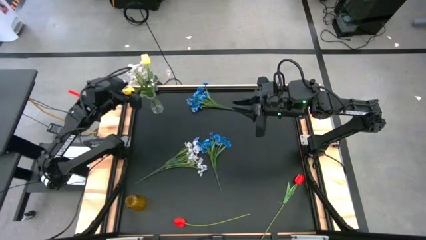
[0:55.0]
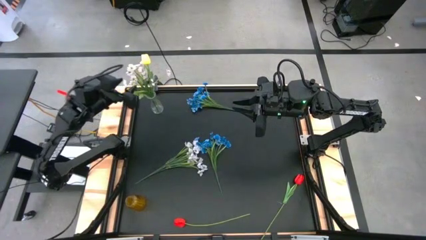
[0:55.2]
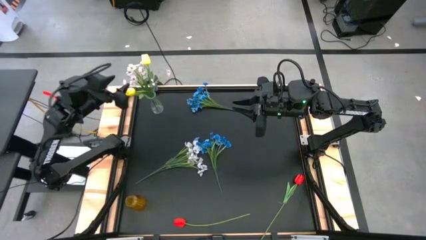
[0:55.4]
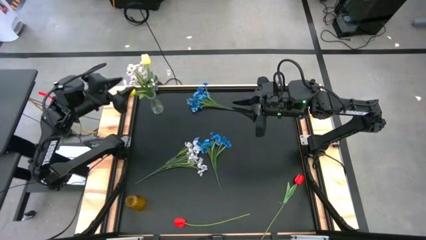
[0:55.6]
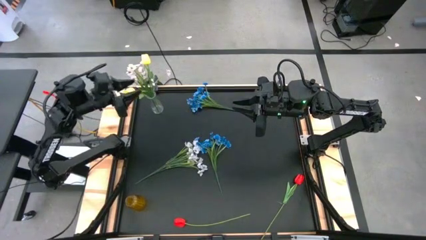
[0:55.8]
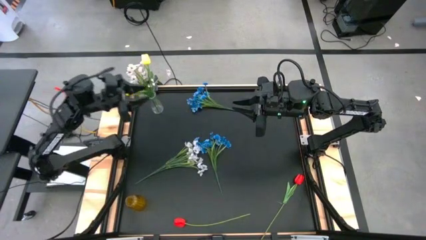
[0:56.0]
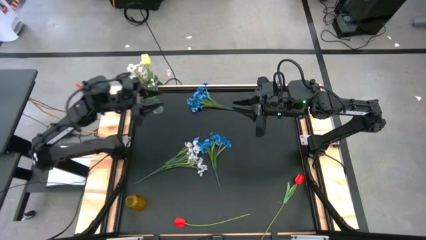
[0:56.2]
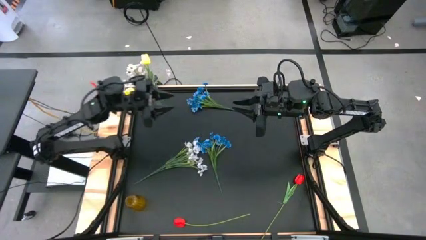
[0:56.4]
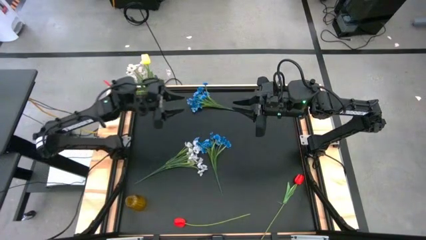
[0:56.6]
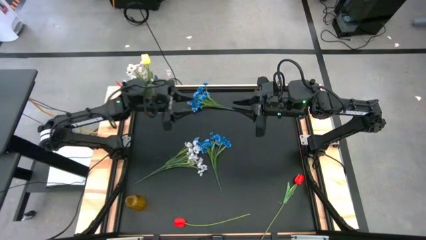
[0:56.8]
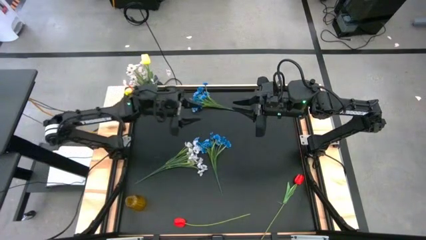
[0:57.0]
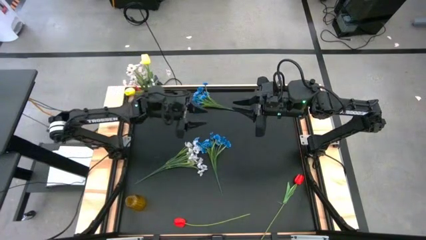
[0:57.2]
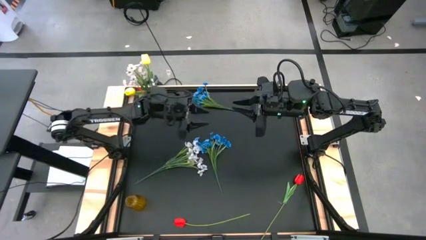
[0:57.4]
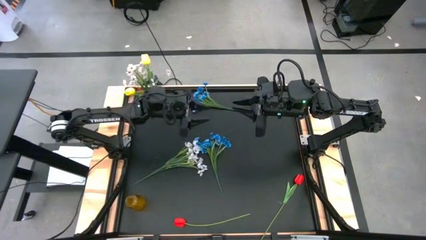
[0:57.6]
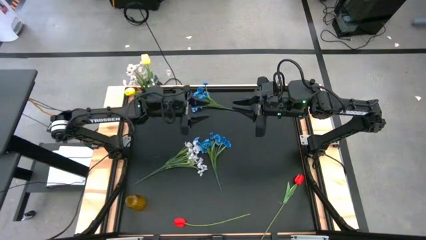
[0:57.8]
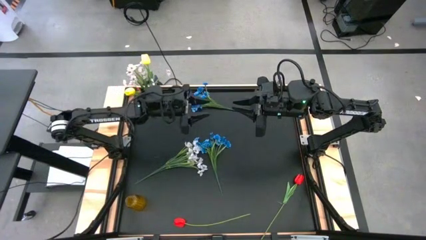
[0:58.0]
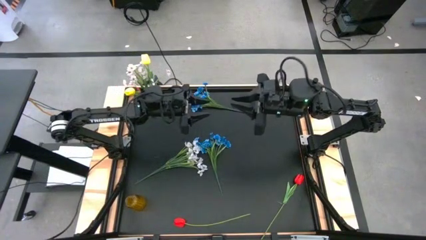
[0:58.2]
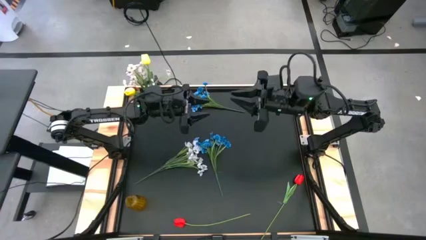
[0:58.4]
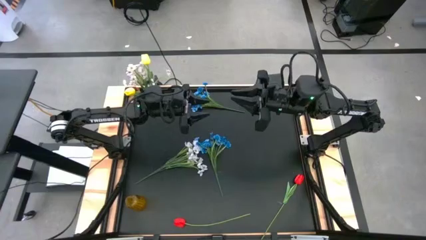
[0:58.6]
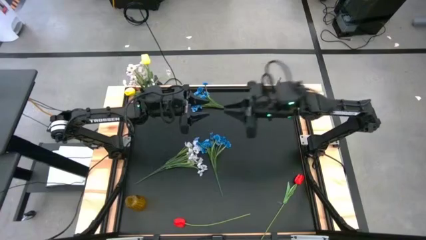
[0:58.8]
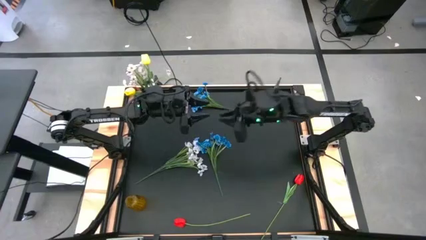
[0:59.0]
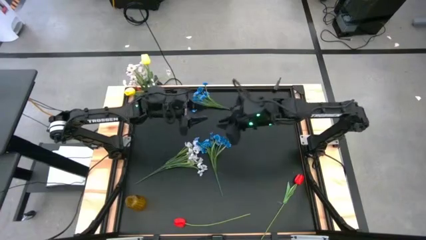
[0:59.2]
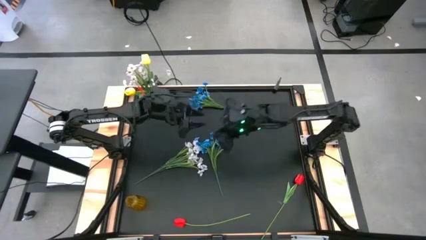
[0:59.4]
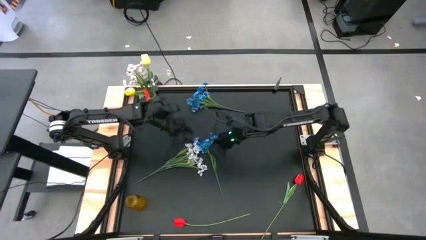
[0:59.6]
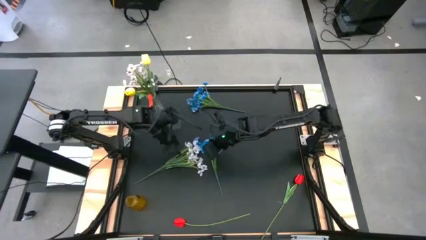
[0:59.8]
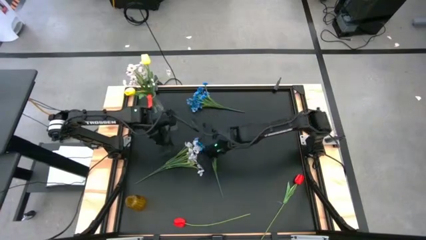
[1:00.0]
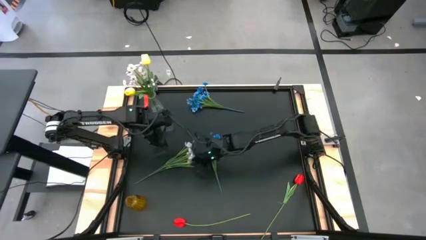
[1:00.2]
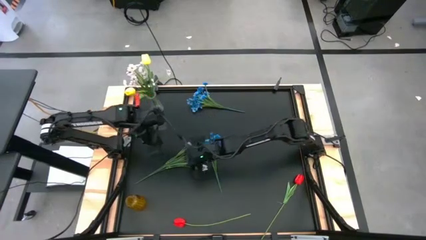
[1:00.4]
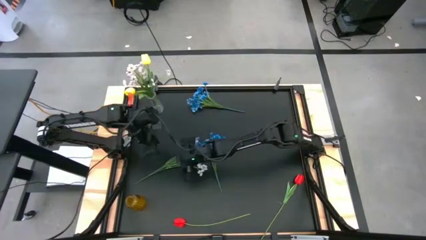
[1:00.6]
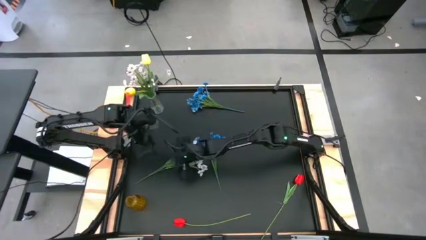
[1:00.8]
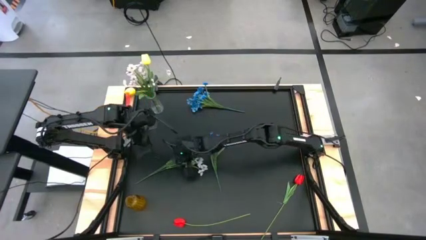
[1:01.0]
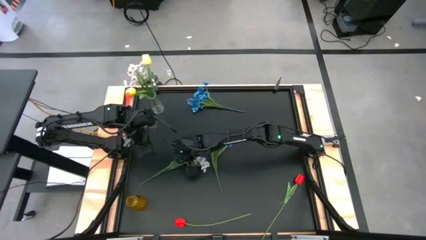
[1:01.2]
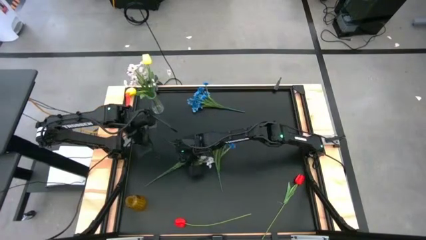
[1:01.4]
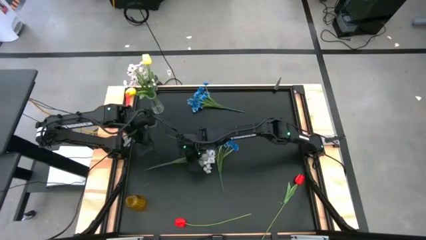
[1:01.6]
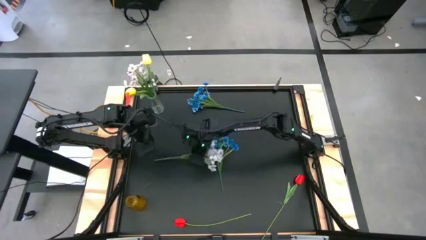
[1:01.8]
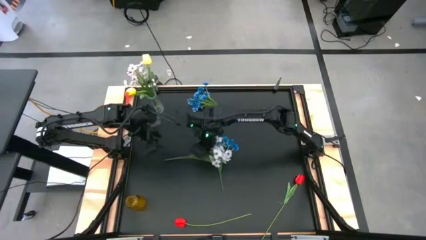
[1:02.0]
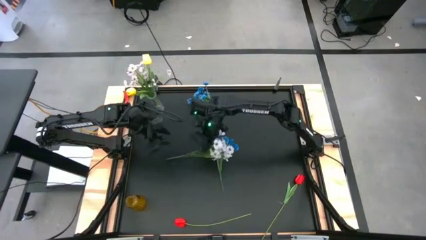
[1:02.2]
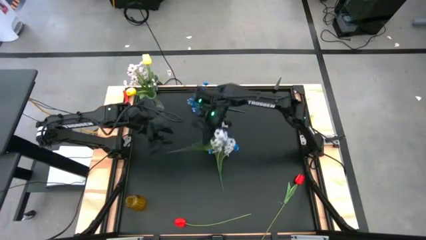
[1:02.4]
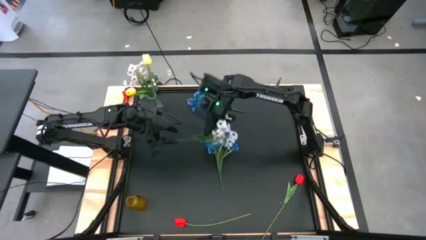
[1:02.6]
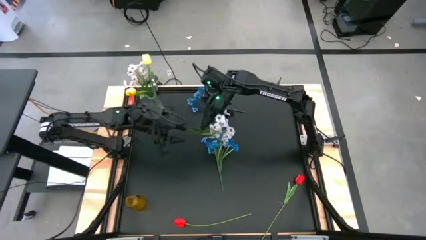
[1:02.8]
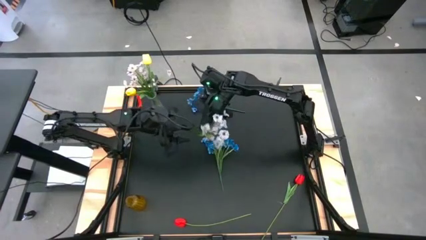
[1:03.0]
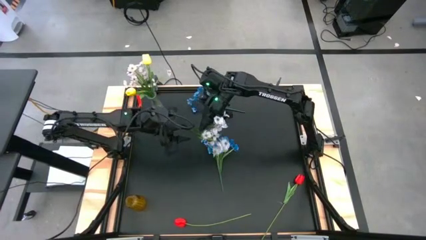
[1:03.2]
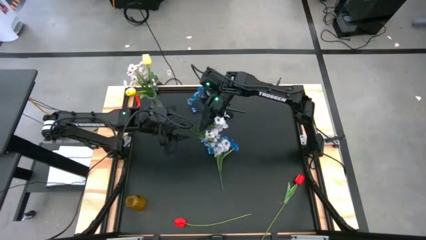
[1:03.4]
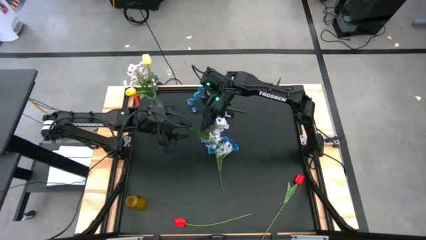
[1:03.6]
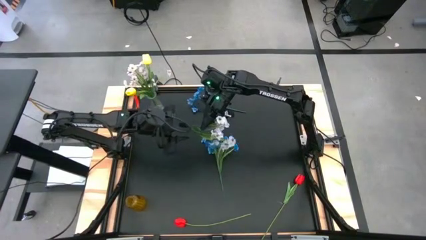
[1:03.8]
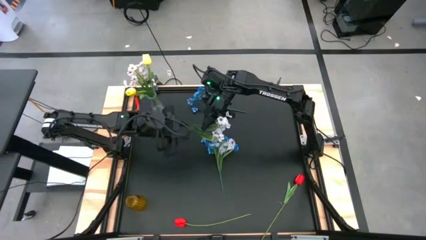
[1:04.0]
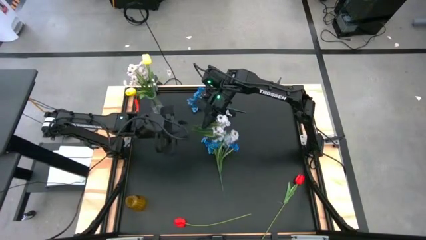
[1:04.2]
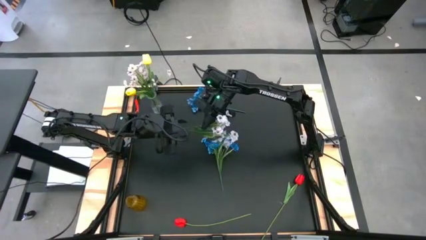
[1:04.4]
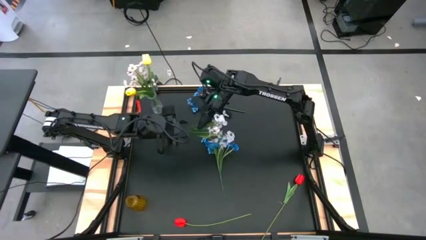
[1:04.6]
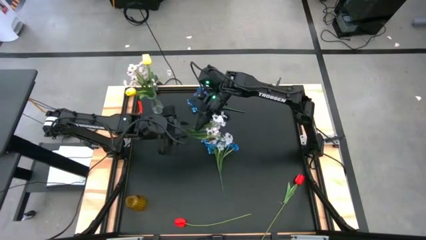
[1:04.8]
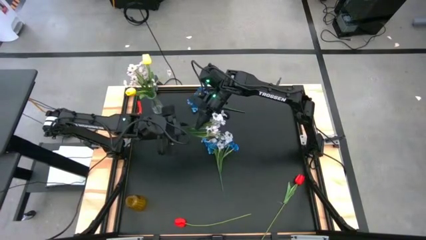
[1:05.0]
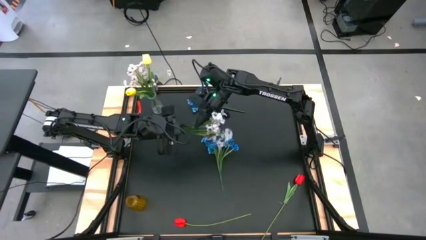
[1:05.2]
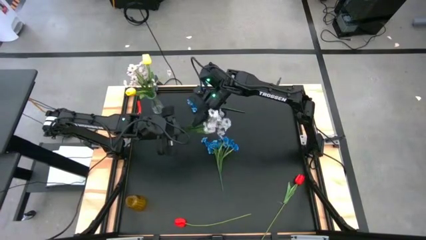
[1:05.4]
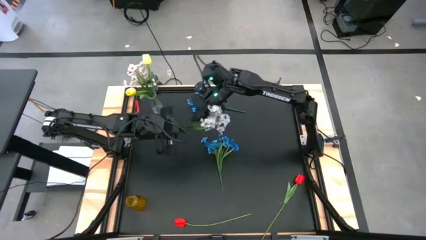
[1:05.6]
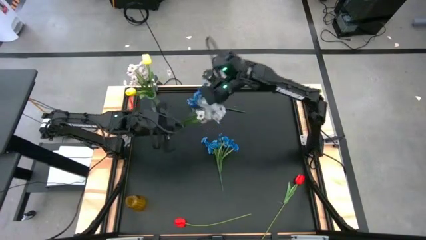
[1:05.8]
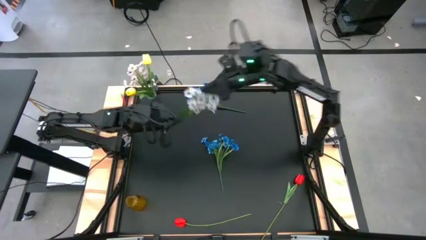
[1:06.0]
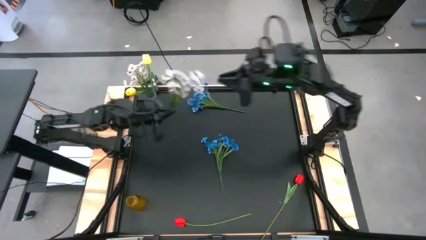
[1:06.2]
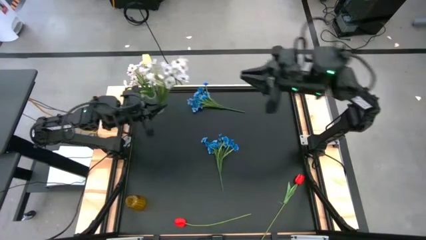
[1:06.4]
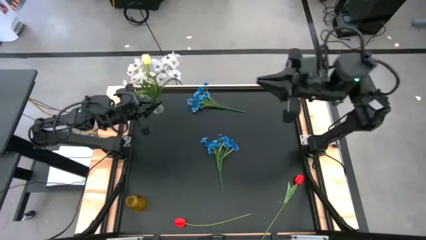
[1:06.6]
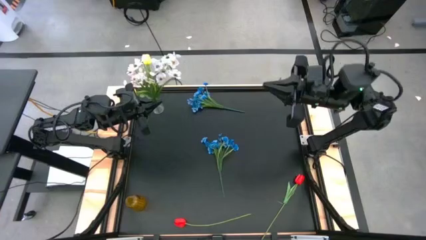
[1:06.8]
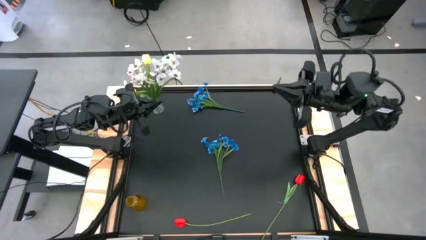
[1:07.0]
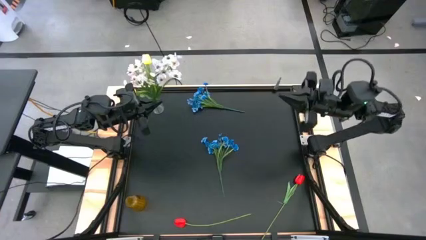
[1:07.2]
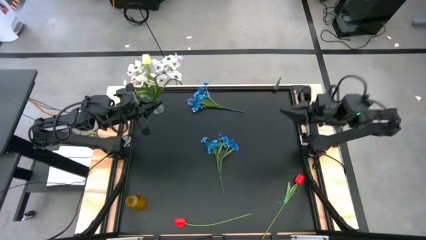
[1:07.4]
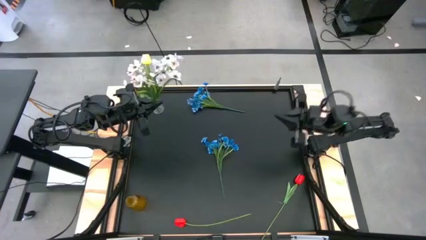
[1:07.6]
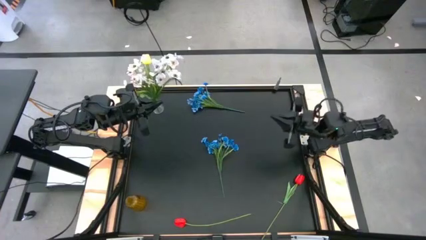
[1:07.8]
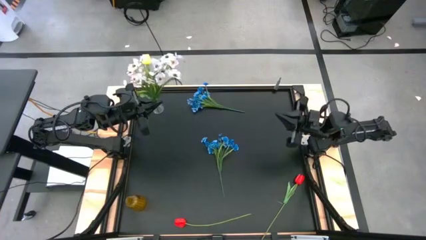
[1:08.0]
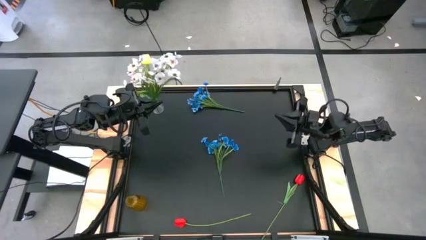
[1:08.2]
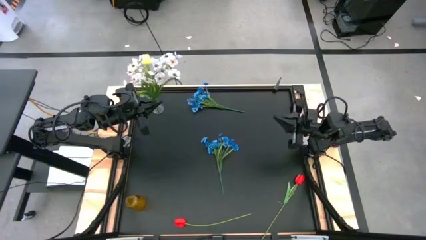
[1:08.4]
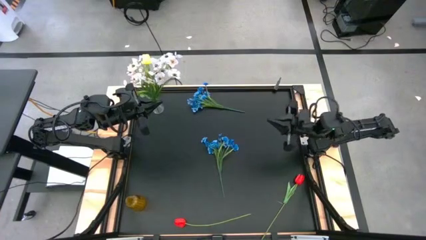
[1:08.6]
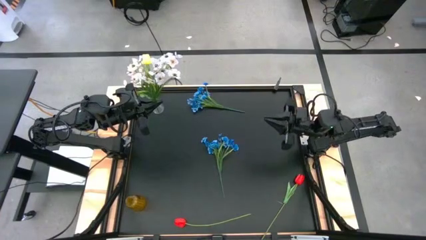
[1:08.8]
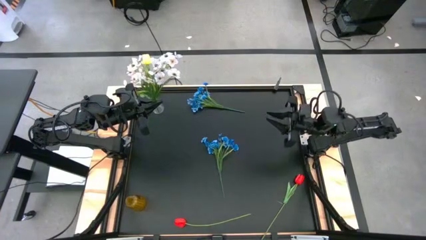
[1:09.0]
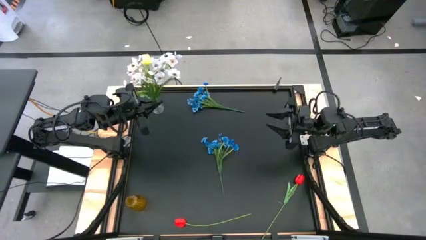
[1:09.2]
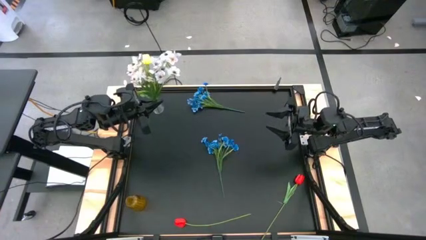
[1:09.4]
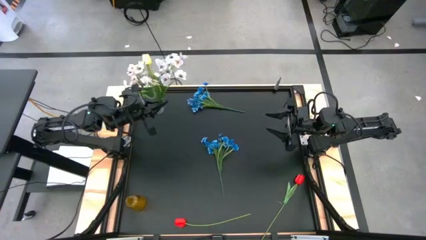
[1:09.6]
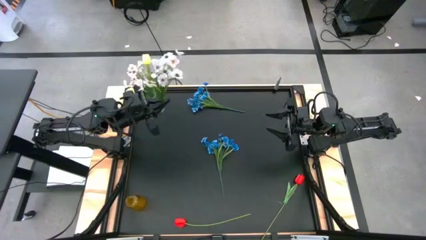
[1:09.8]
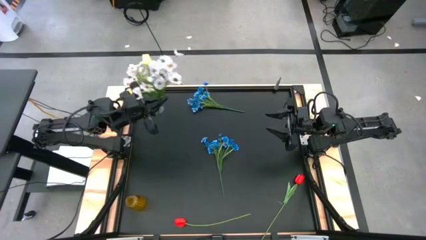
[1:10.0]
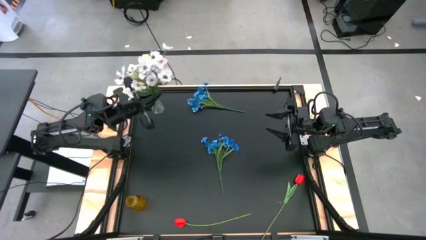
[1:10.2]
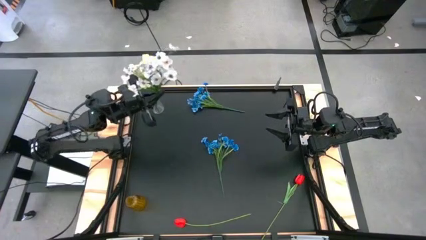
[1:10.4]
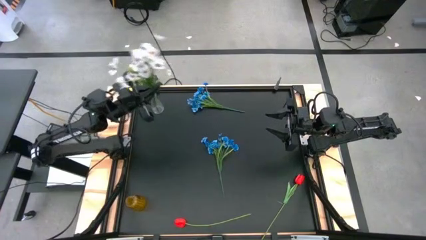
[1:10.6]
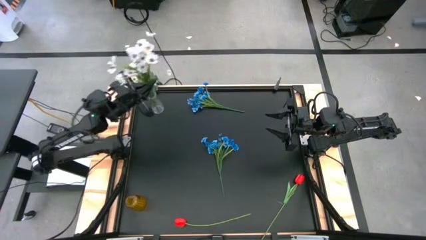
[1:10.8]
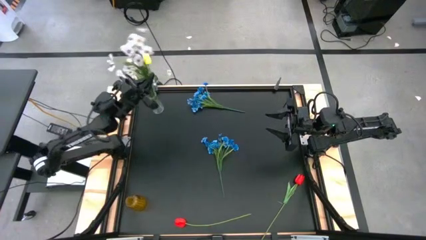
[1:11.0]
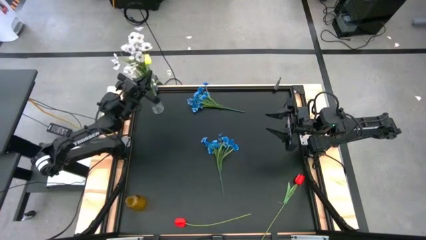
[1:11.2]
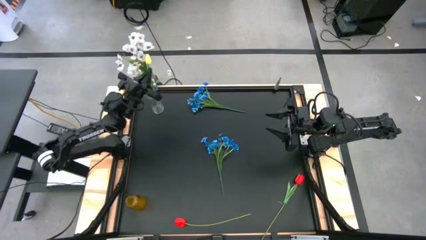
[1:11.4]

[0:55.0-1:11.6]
Task: Sort flowers into vase by color
Put the white flowers into the transparent vase
